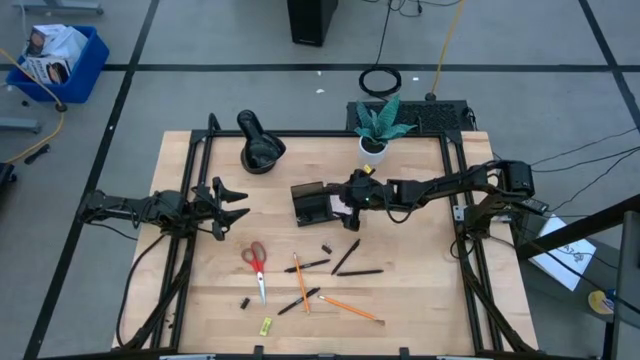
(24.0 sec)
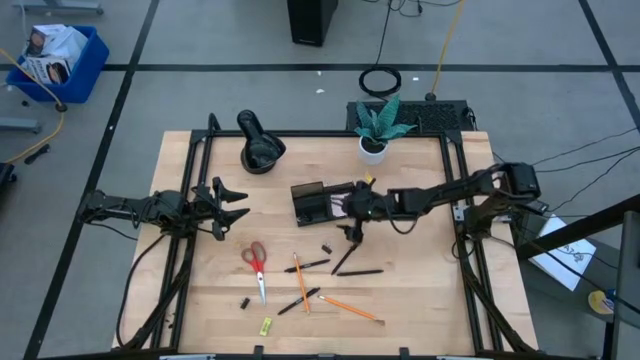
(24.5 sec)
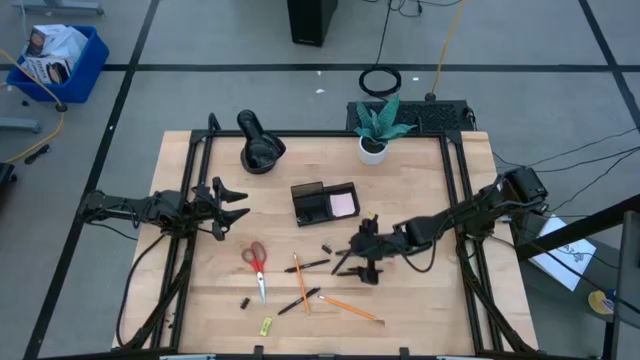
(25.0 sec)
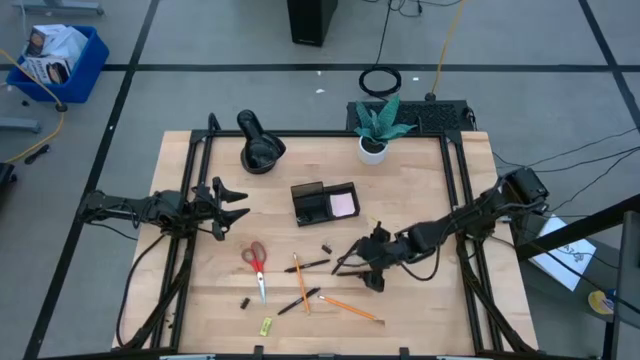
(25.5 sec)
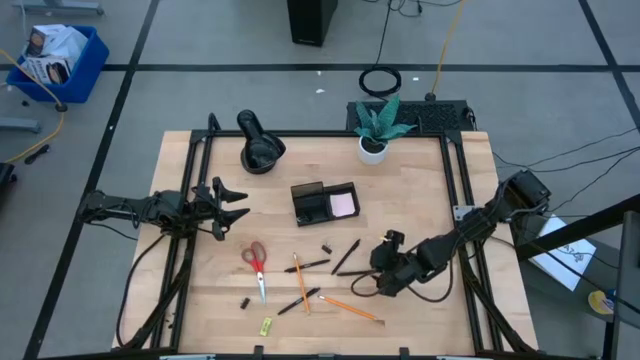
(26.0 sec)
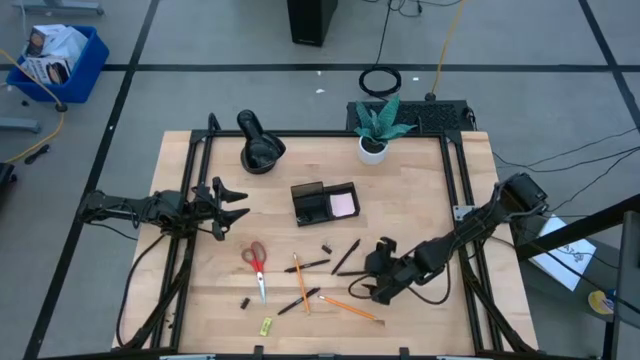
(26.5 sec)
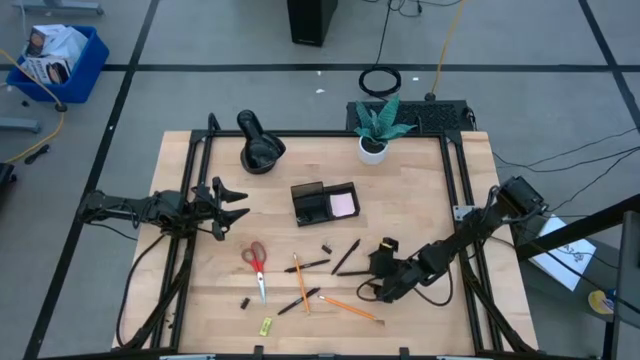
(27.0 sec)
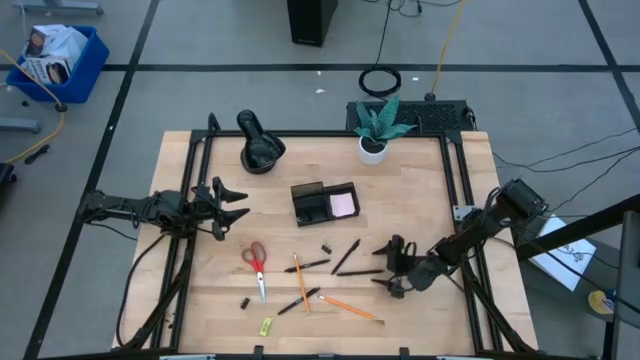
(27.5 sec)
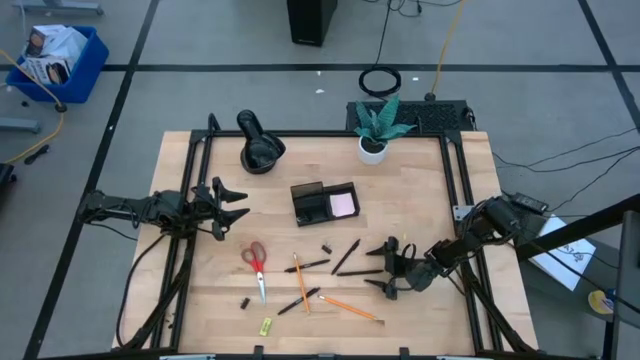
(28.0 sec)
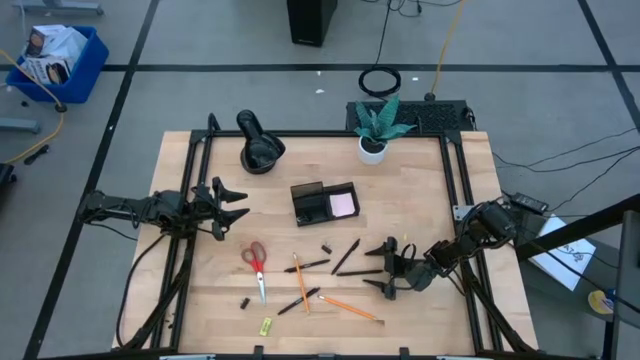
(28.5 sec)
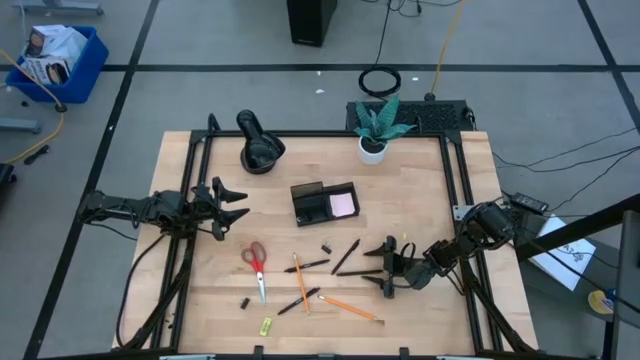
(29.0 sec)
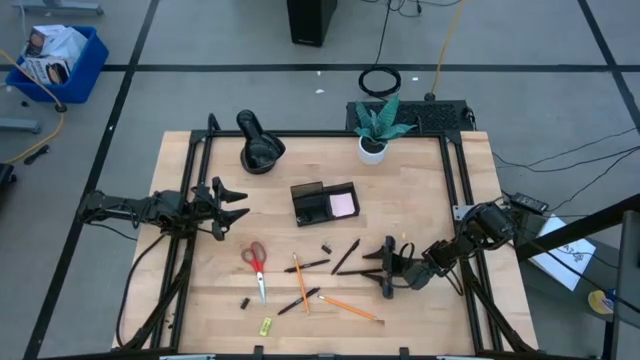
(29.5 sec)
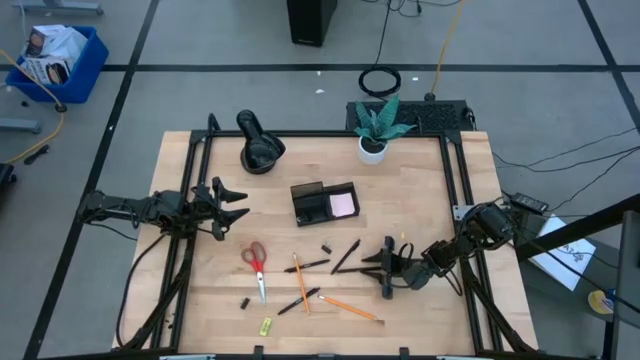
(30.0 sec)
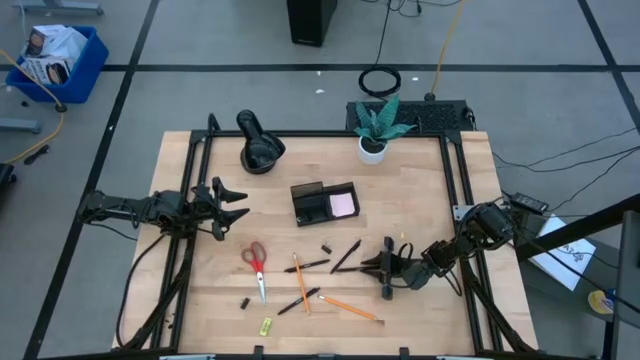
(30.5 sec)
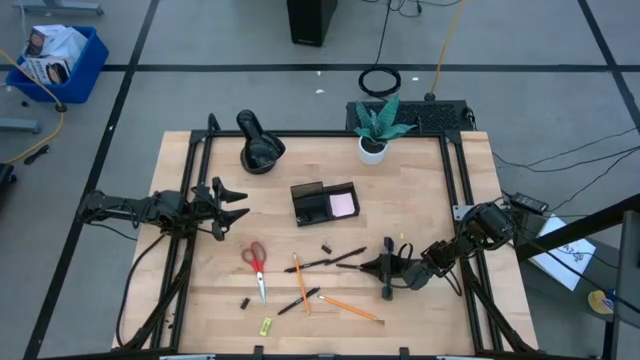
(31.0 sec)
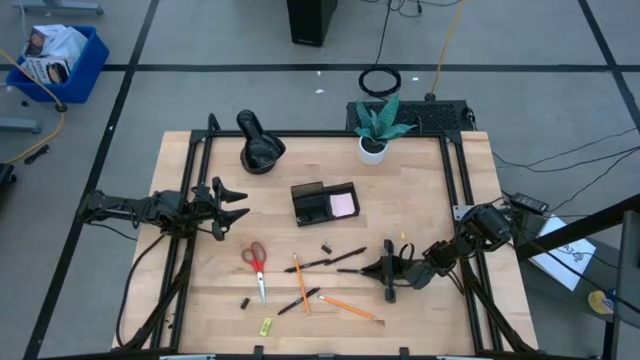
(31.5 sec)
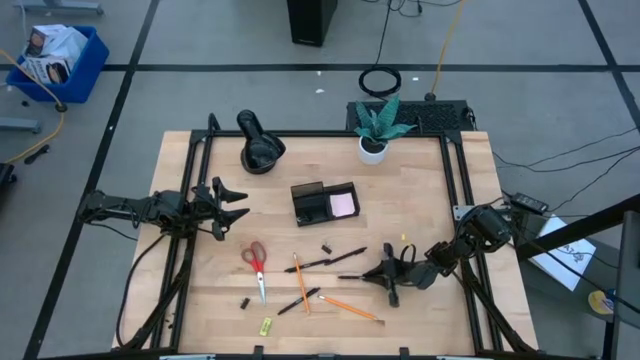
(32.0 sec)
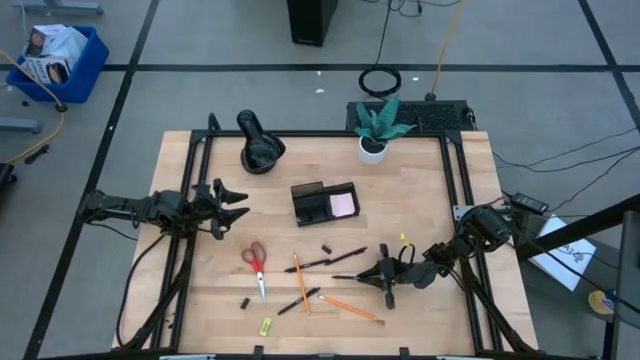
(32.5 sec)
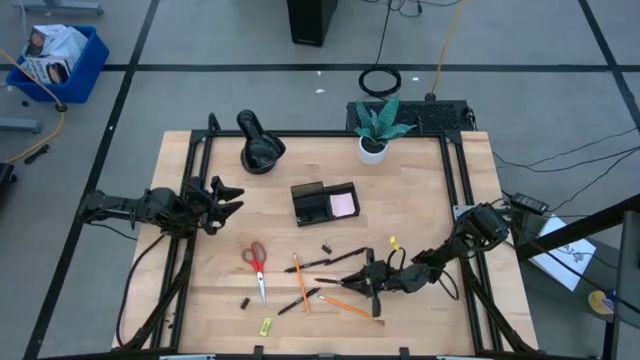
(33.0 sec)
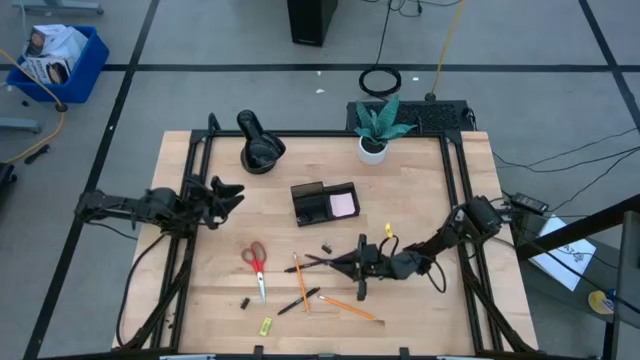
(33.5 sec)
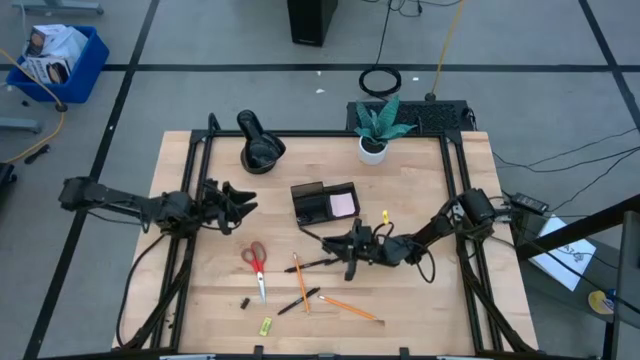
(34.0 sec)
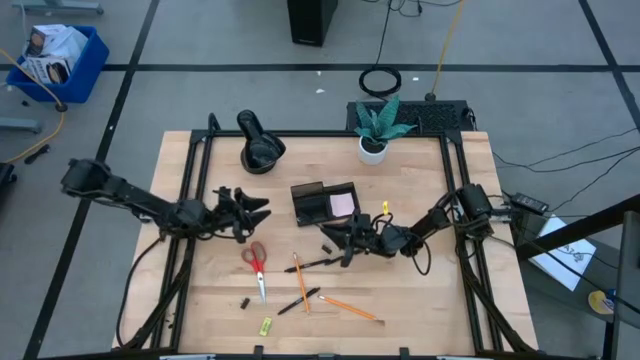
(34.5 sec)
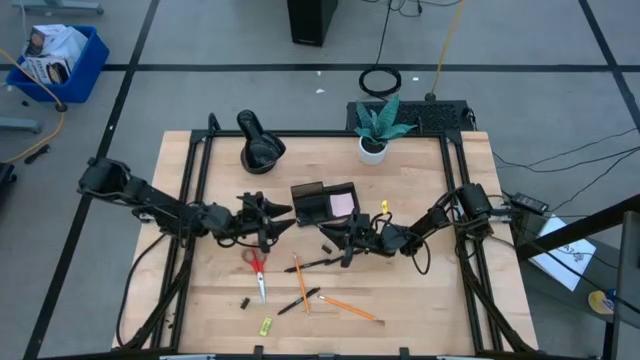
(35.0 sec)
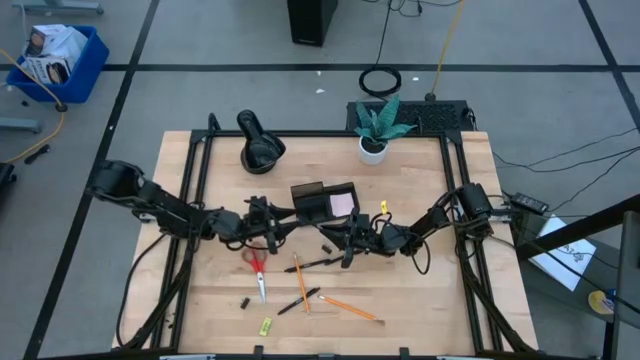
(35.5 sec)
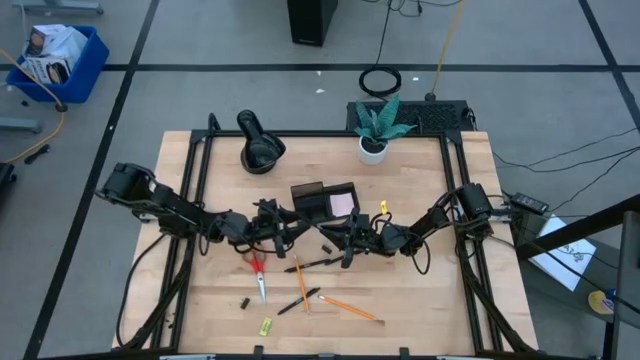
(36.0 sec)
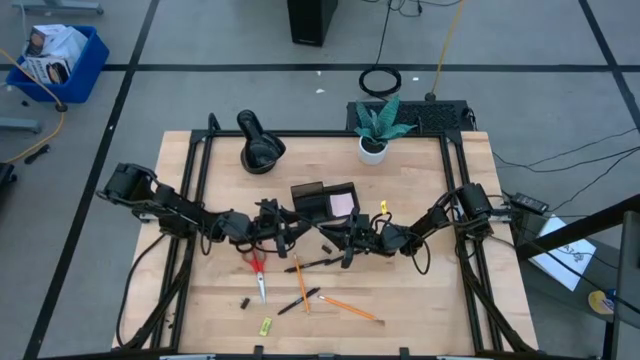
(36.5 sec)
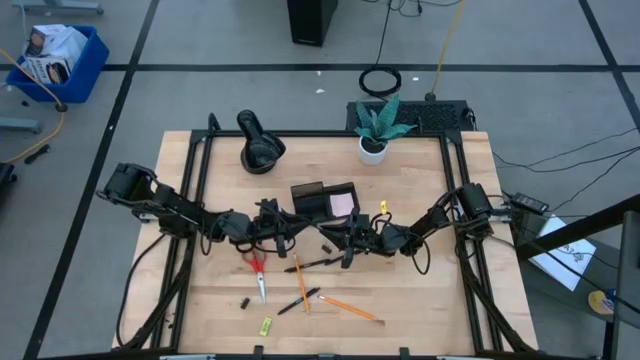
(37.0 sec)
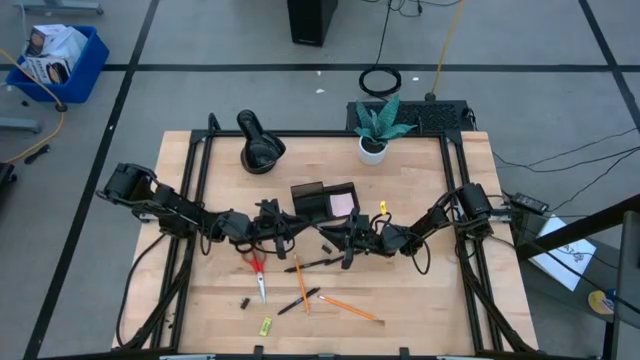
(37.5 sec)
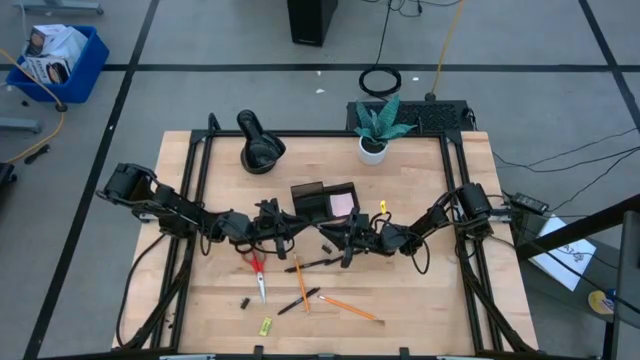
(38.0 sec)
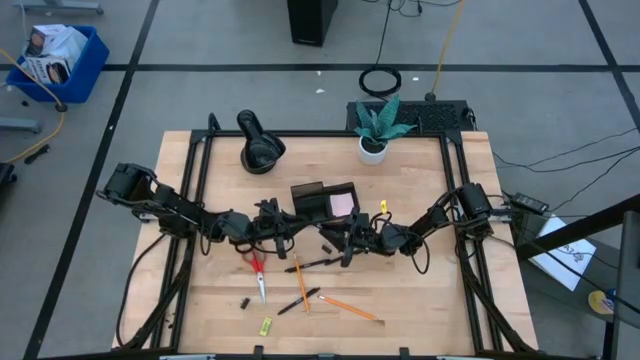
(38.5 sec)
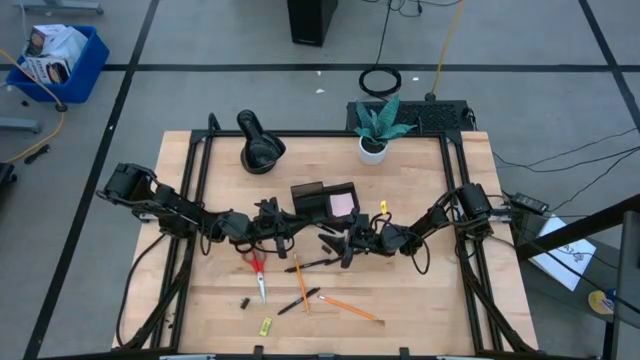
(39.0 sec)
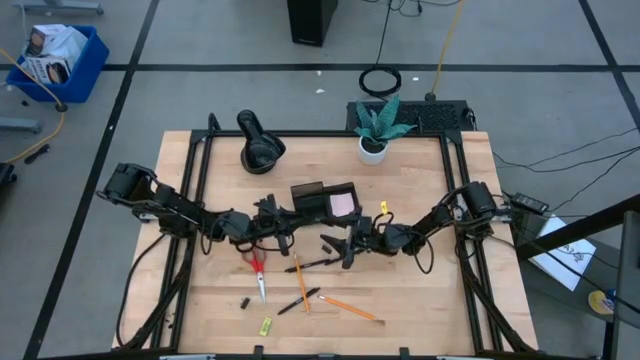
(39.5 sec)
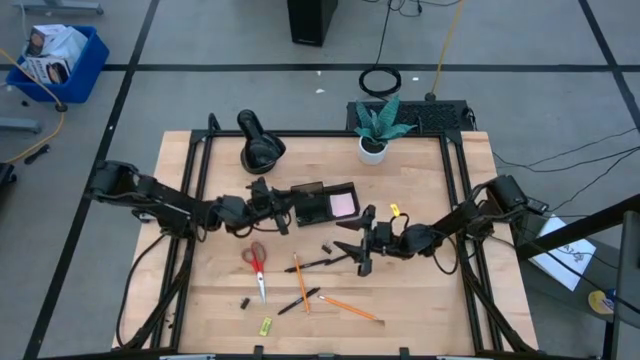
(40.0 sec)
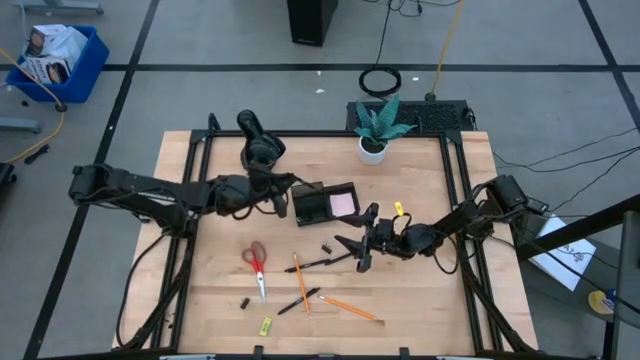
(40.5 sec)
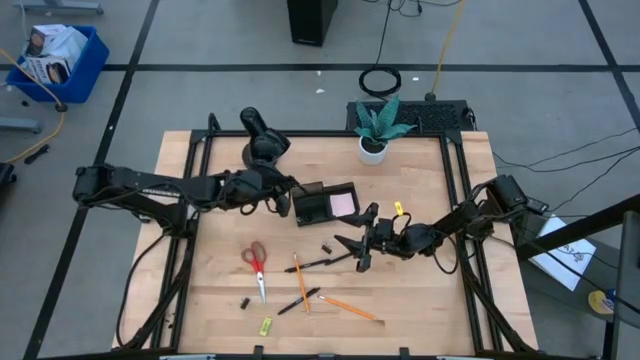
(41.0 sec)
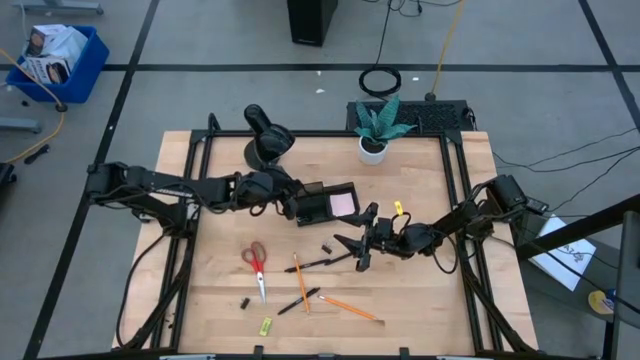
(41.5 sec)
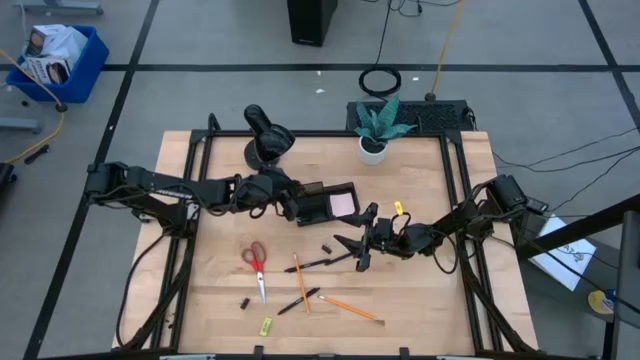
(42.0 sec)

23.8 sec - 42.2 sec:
Task: Pick and place office supplies into organizer
Put the black pen into the desk organizer

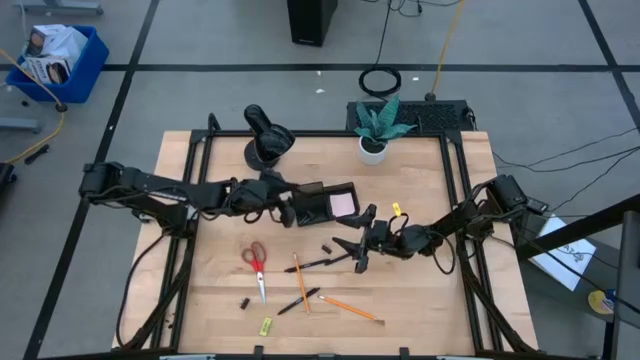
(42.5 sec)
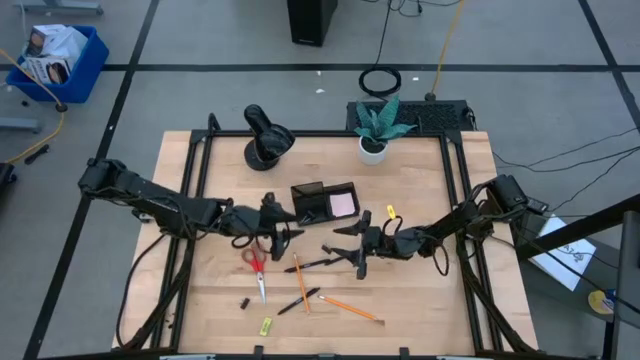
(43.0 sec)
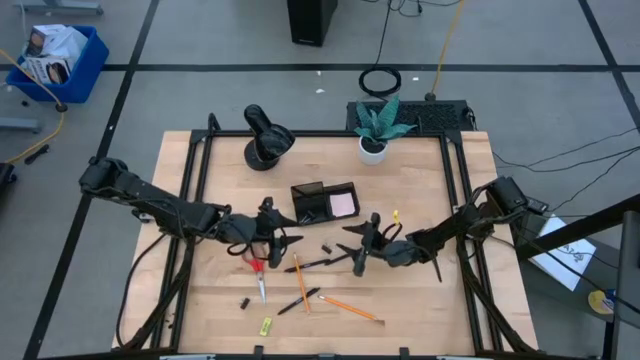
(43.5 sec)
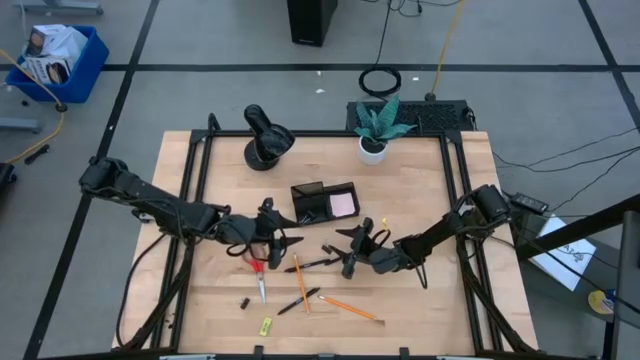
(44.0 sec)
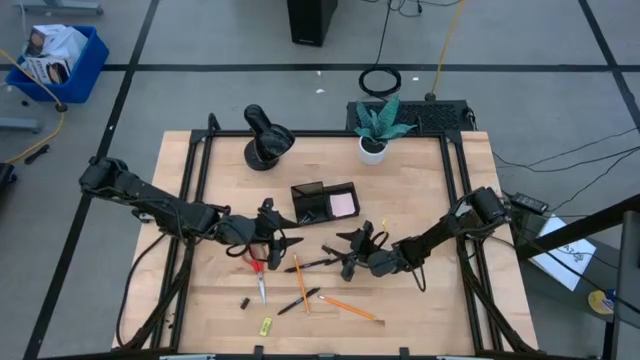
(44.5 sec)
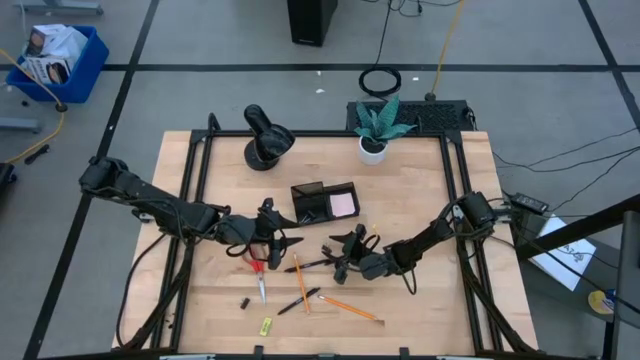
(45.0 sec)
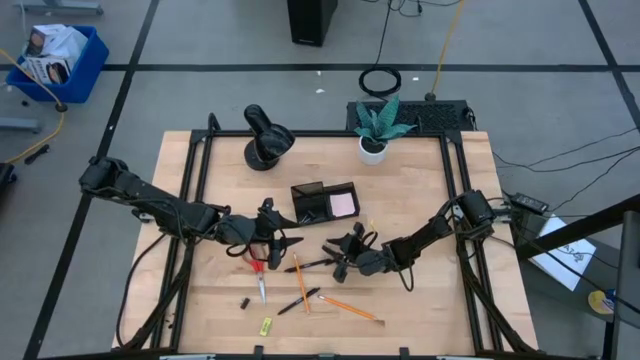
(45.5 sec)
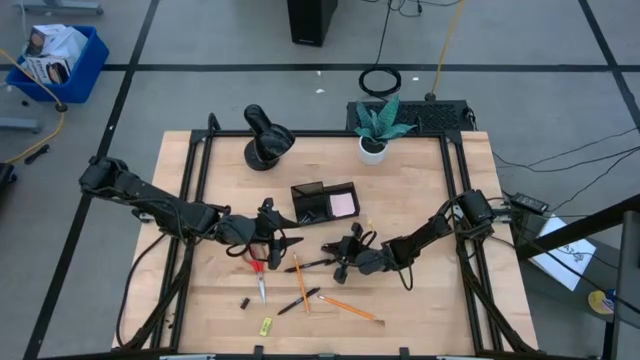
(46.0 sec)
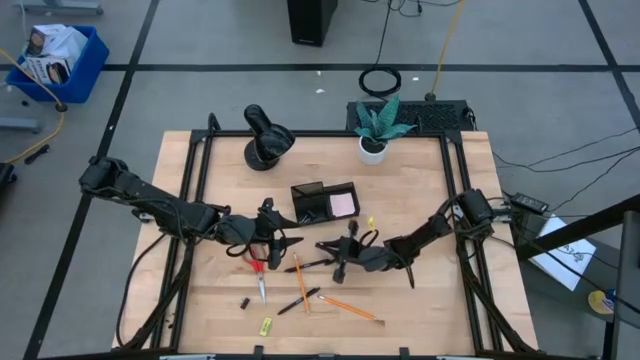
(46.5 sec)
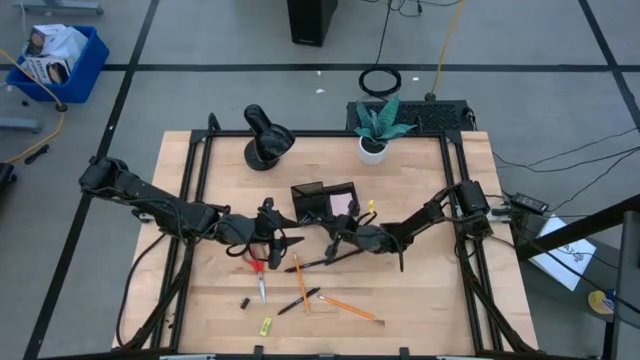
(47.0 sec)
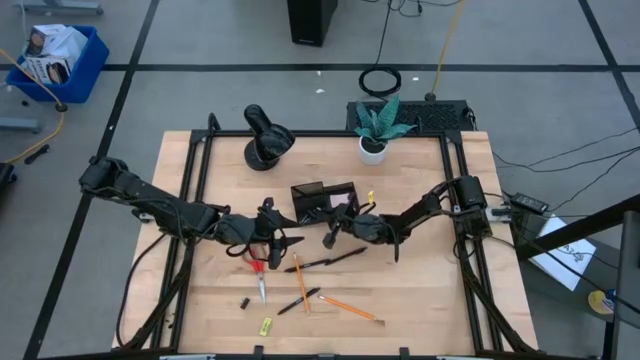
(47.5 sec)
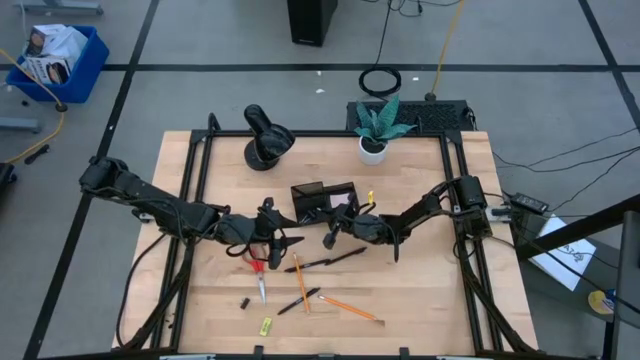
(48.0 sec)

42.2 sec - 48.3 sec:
Put the black binder clip into the desk organizer
